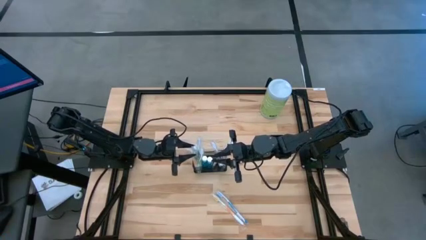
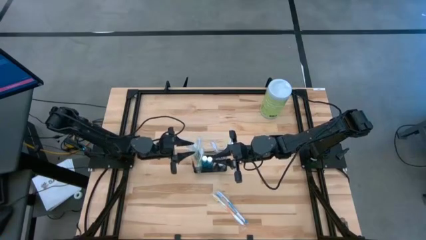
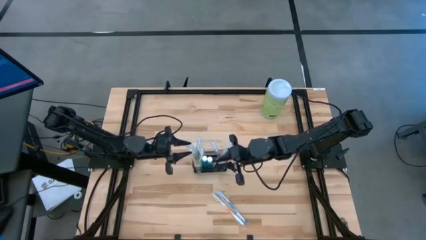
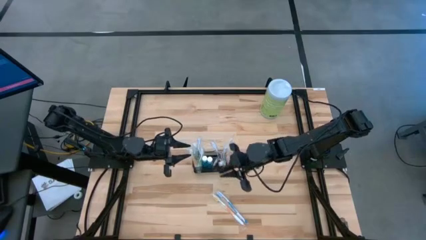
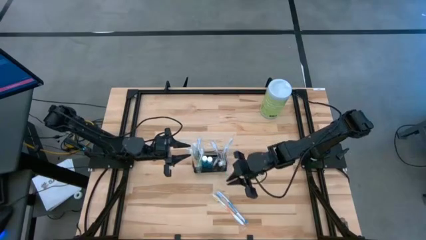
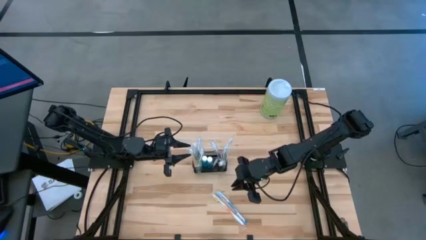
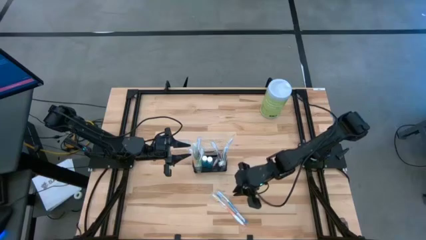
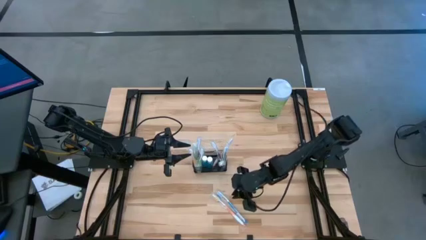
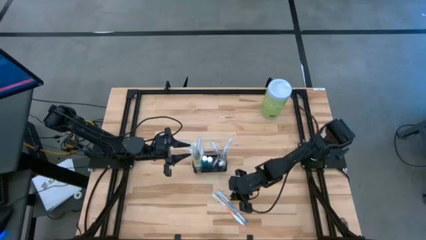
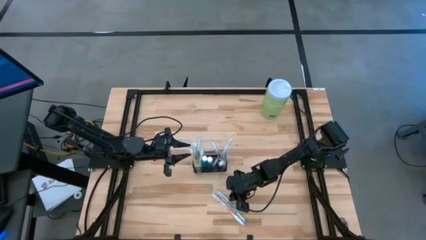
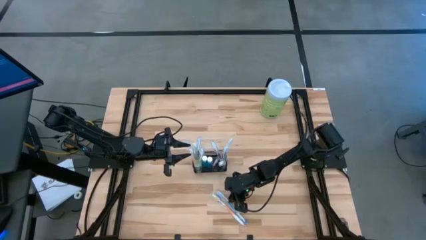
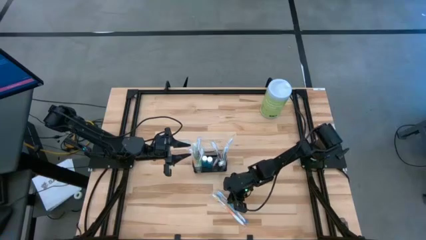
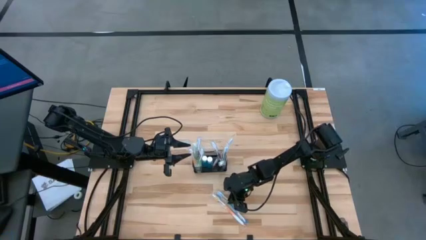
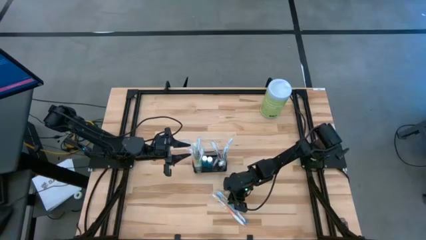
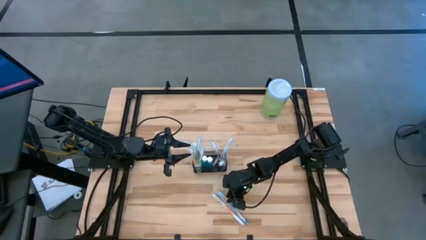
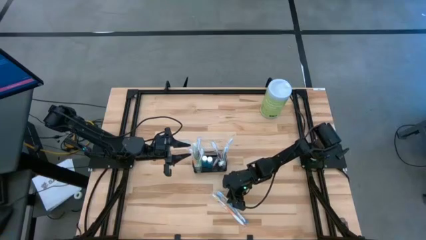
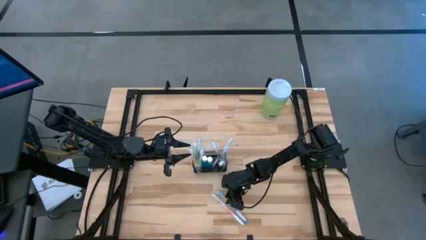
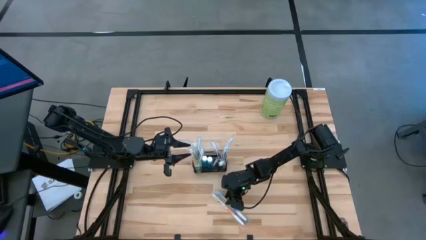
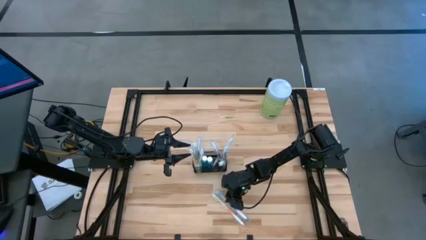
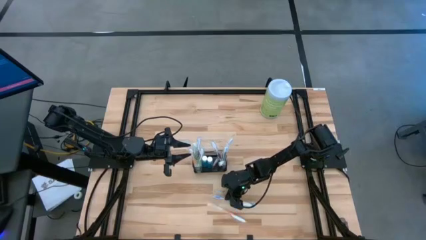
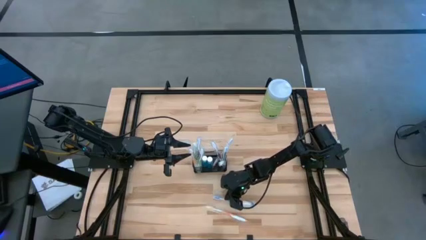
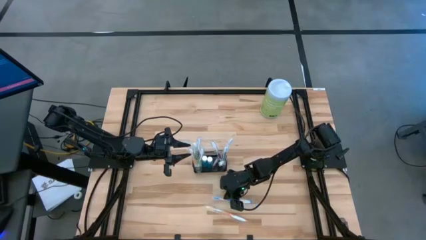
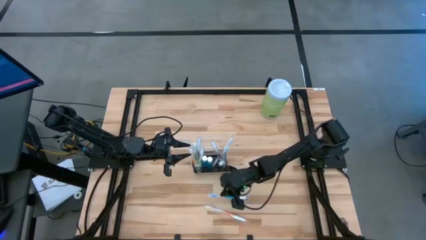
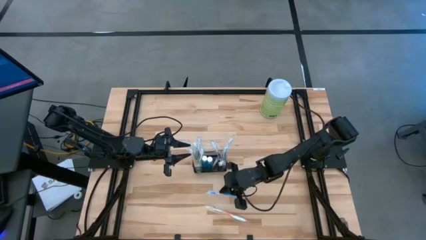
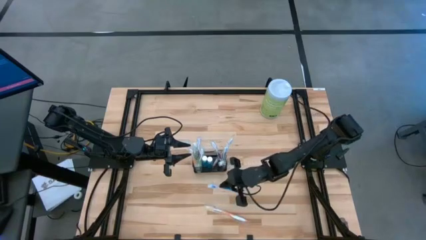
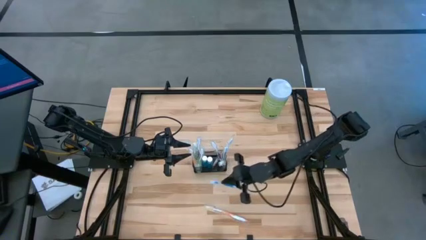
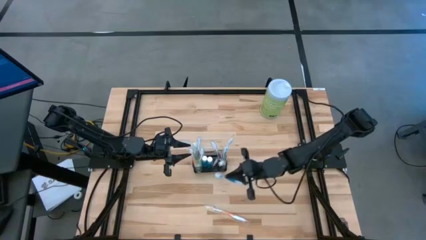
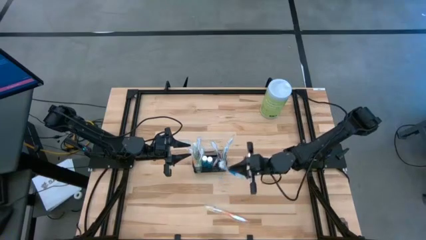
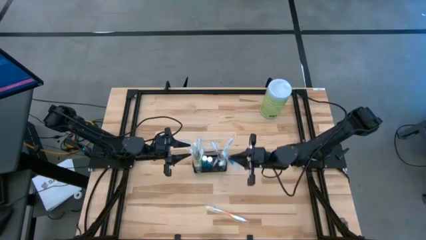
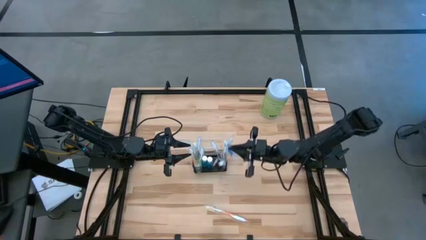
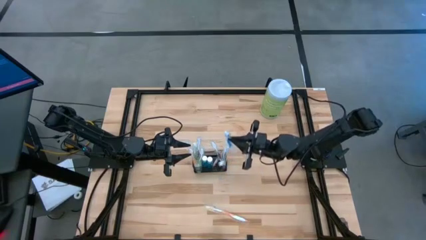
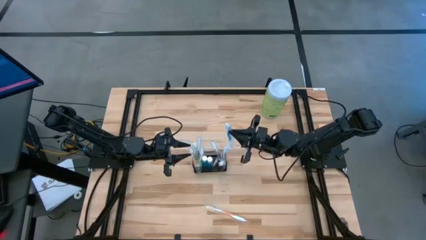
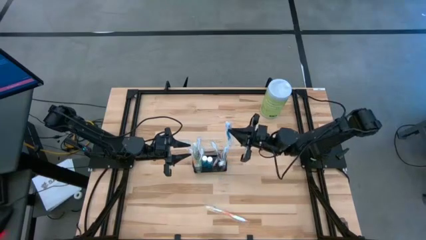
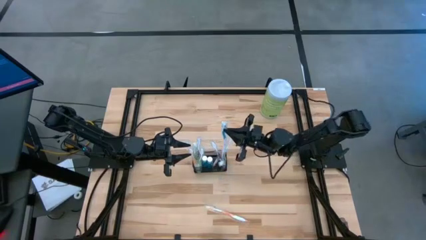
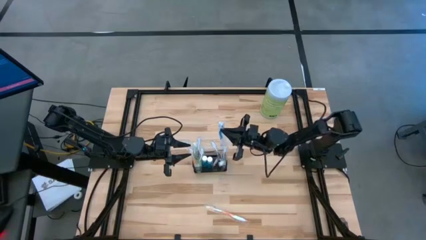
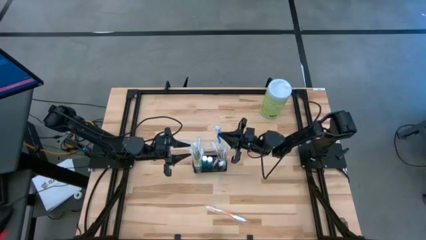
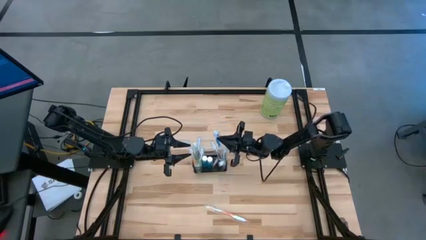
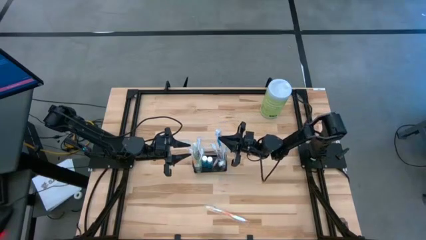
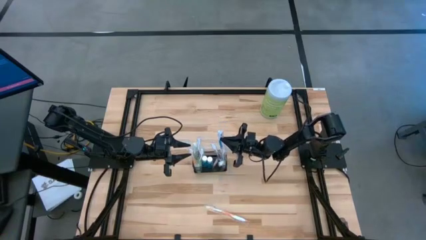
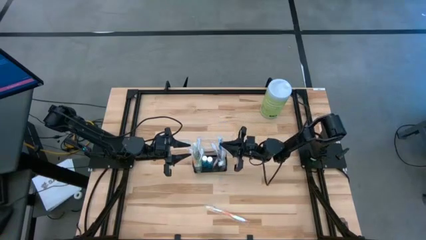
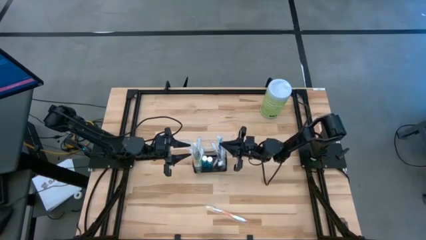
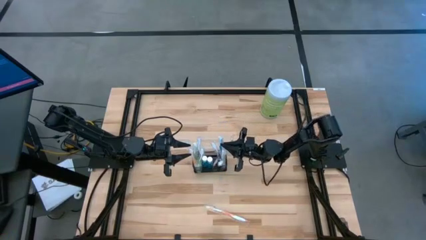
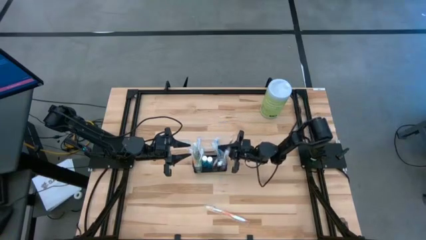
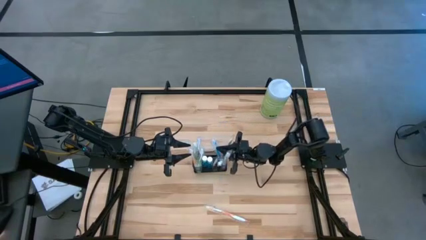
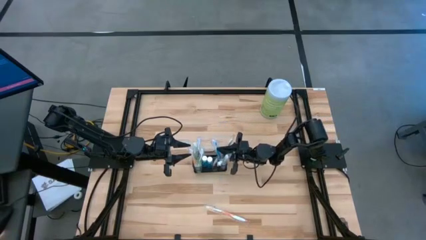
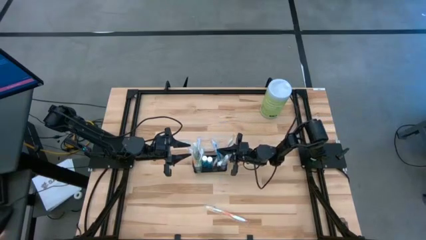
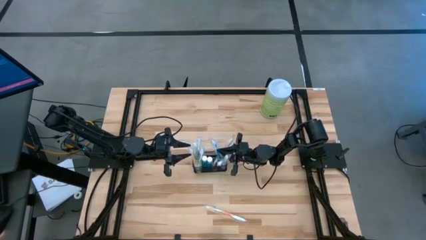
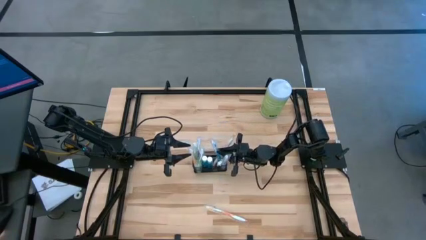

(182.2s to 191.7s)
Task: Pick & Place toothbrushing station
Put the blue toothbrush into the mesh

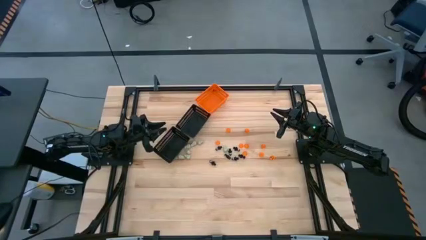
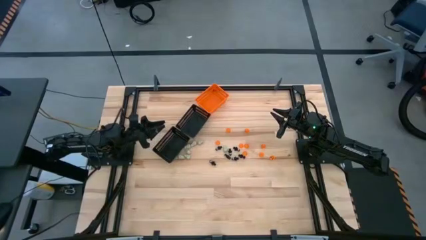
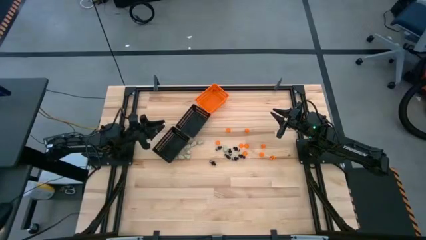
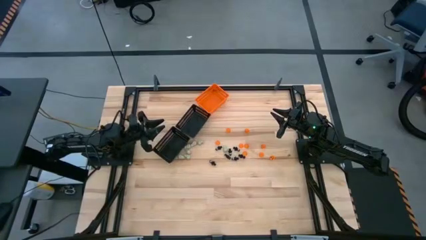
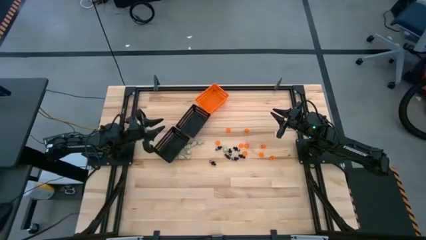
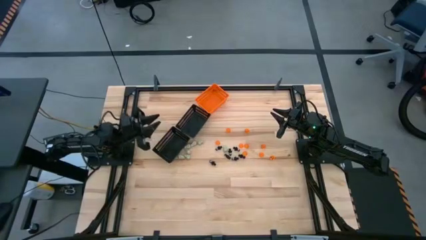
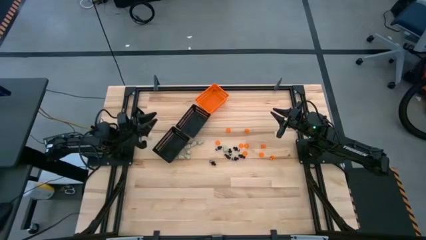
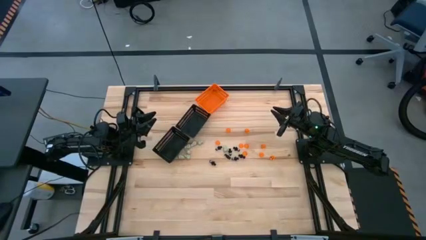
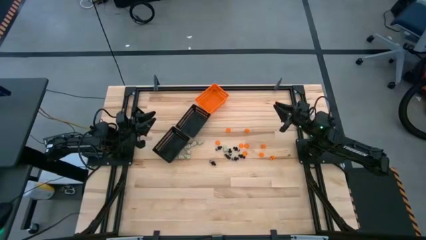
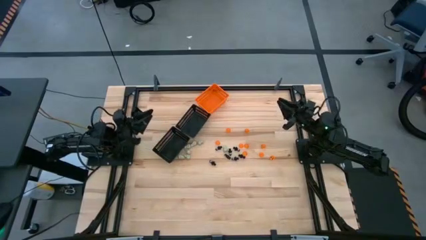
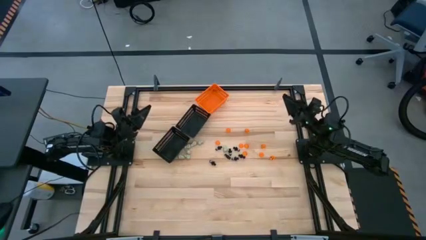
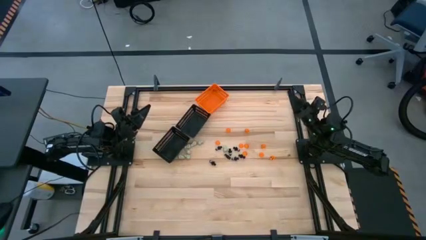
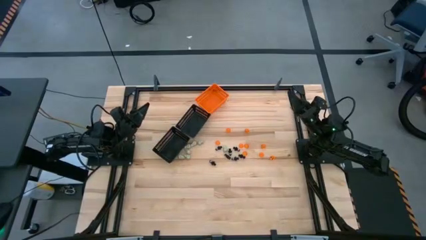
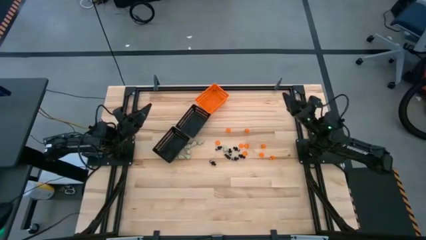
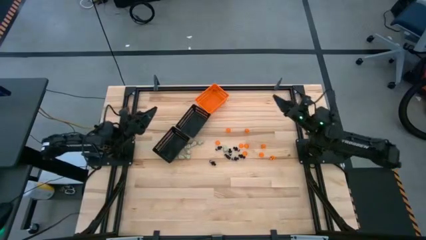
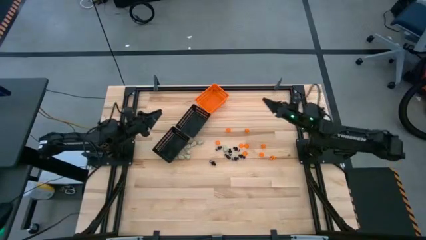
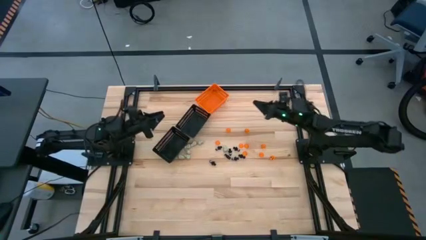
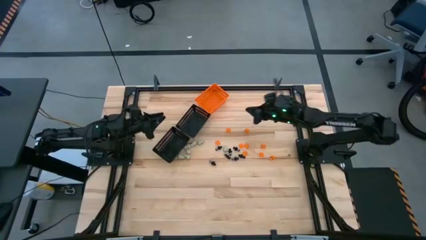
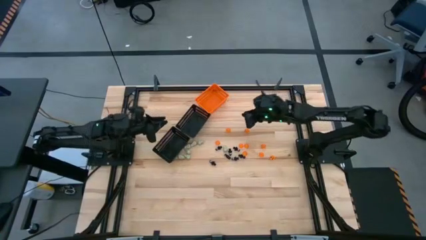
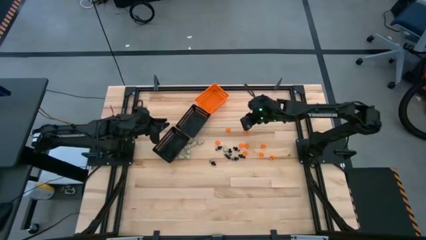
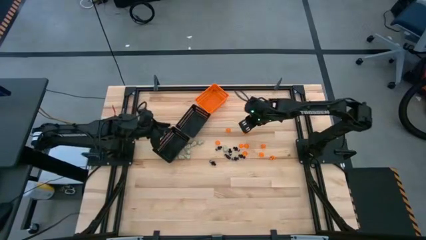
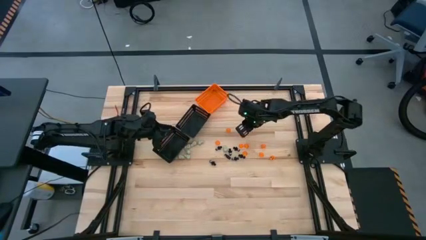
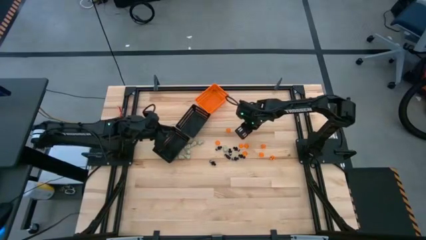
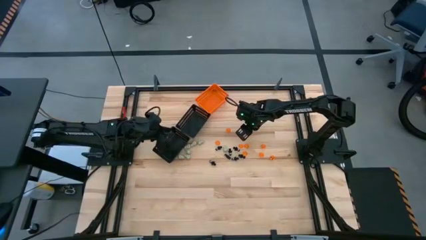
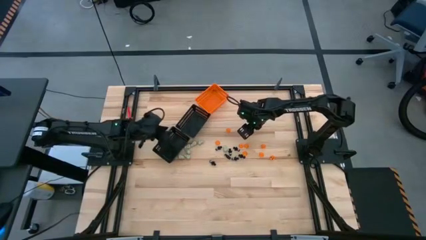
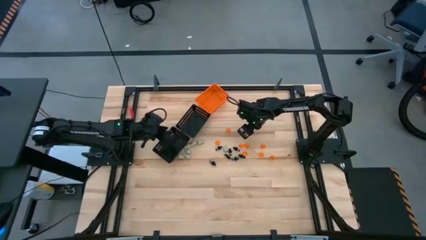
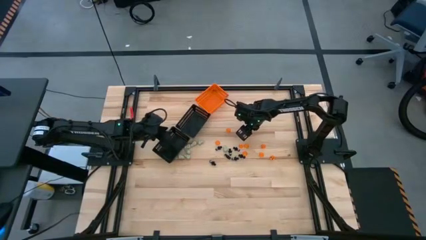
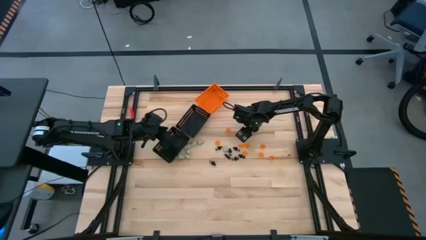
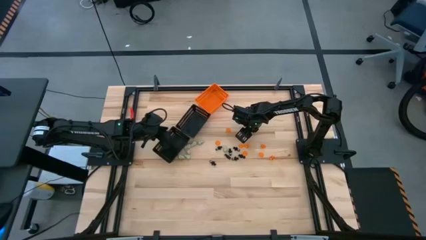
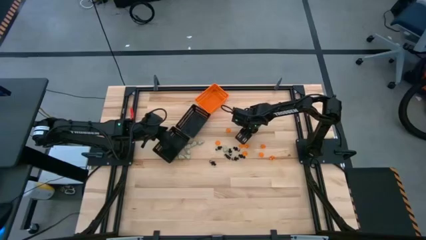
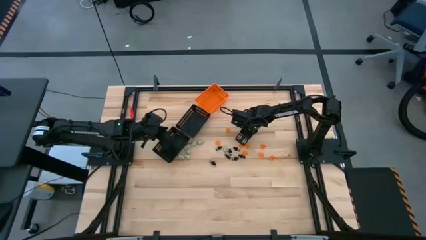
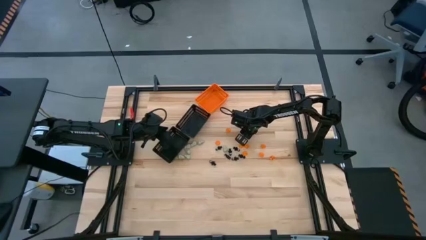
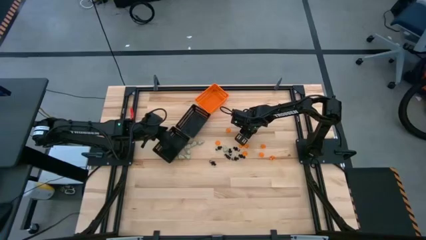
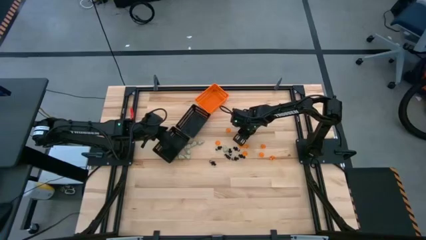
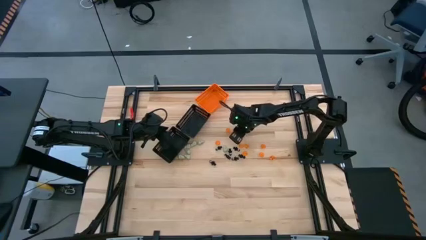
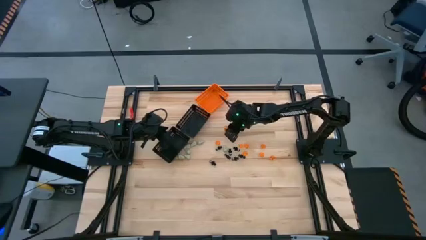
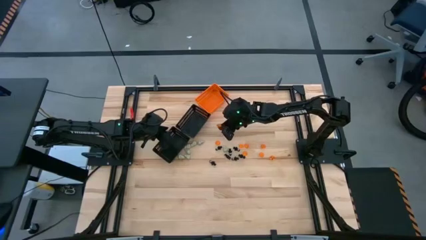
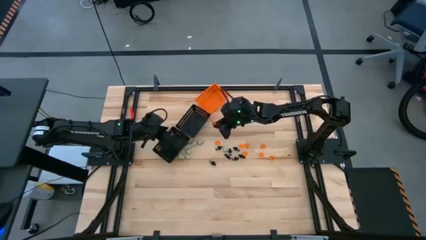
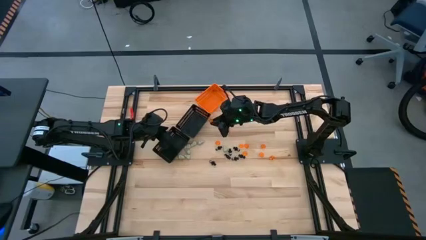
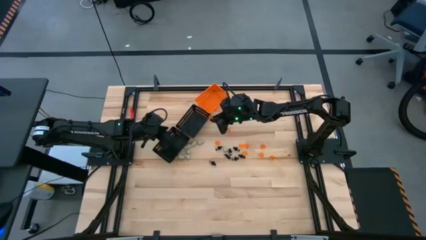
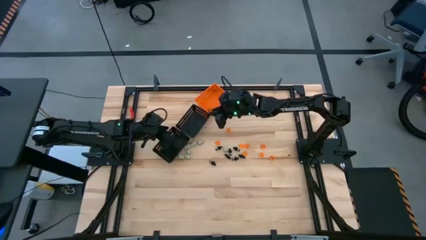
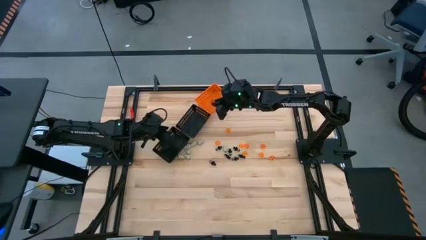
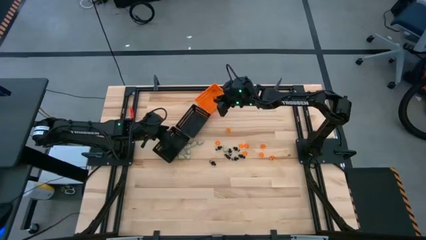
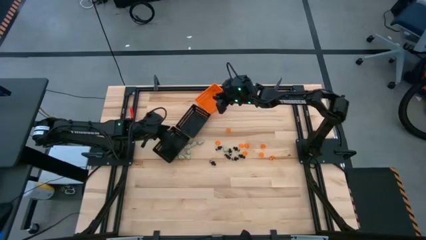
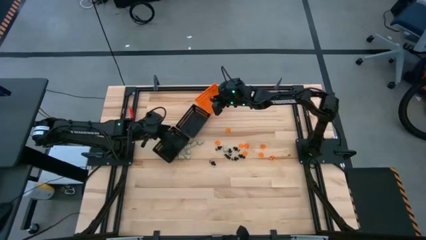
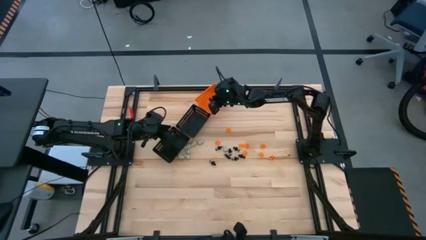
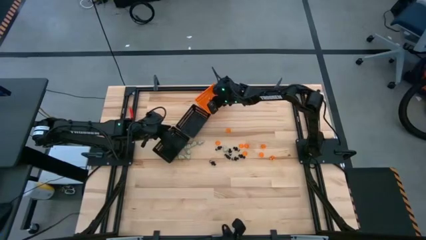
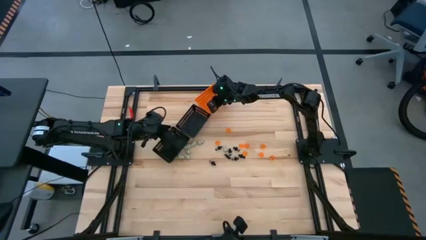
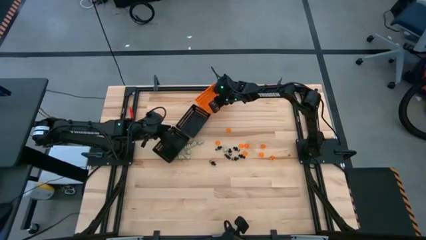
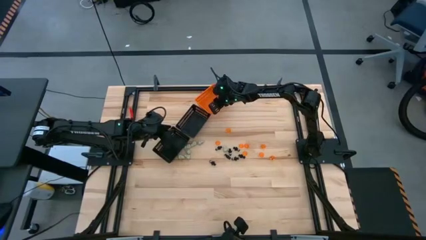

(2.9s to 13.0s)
Task: Sort Halloween decoration
Put the orange pumpkin toy into the orange bin
